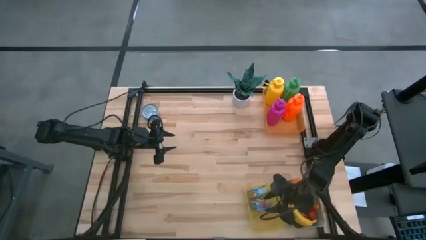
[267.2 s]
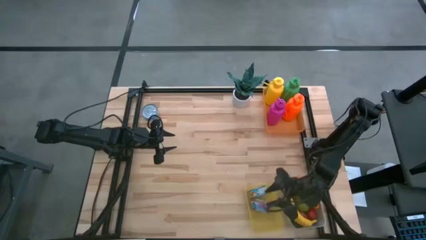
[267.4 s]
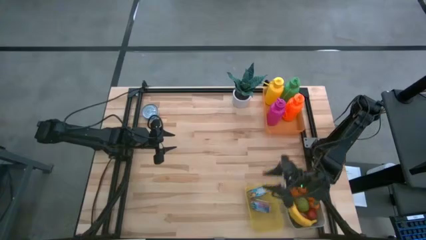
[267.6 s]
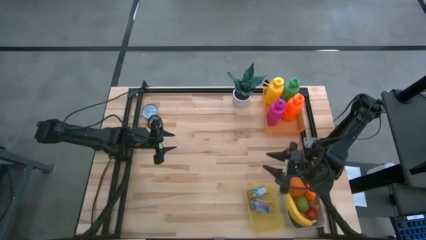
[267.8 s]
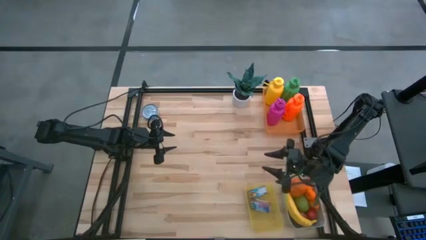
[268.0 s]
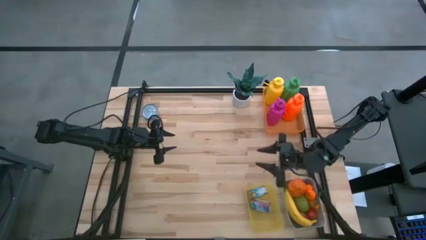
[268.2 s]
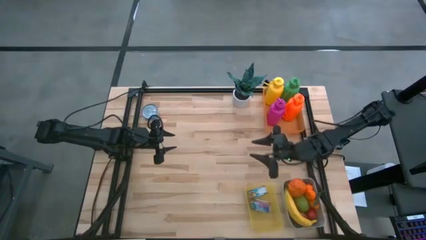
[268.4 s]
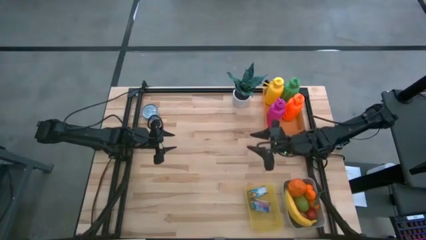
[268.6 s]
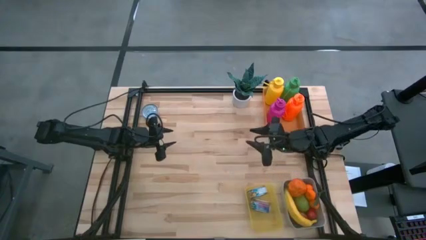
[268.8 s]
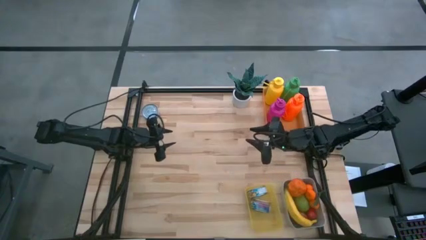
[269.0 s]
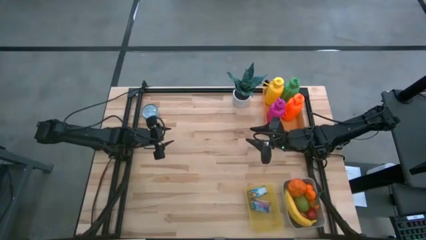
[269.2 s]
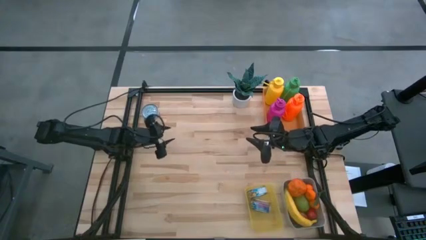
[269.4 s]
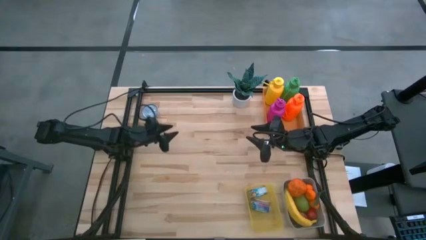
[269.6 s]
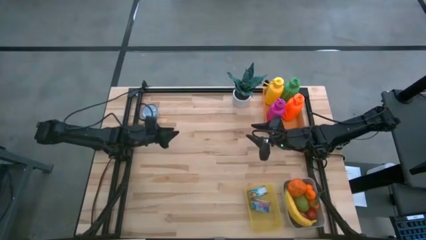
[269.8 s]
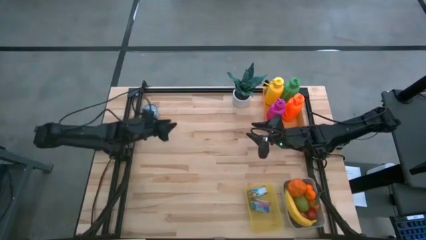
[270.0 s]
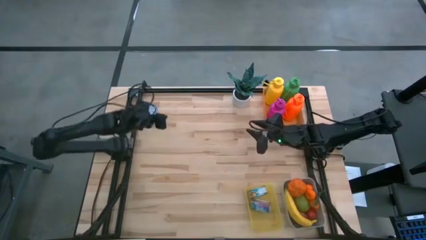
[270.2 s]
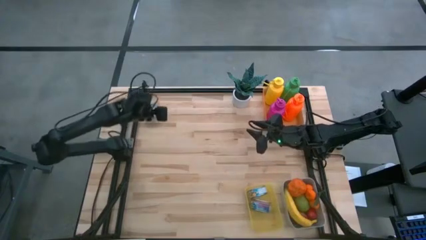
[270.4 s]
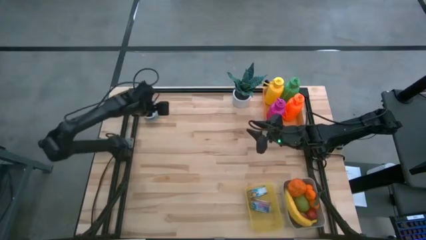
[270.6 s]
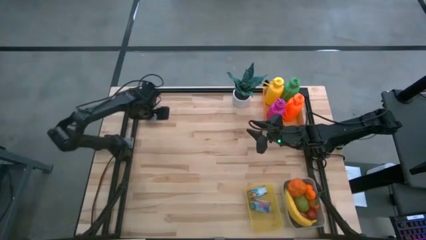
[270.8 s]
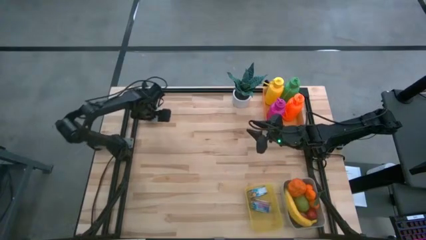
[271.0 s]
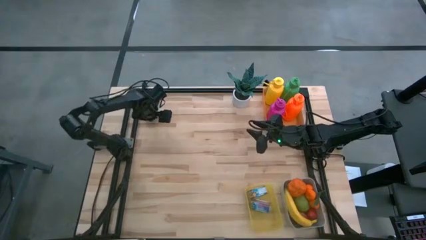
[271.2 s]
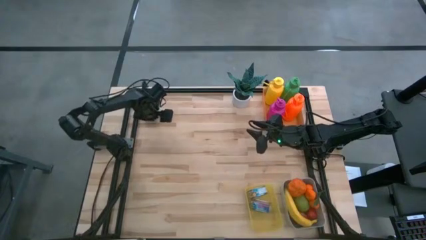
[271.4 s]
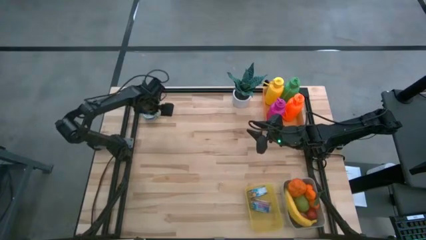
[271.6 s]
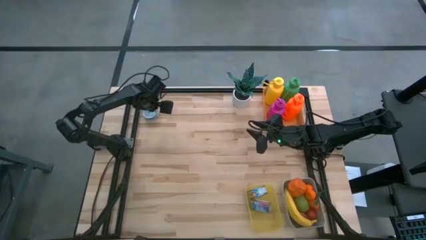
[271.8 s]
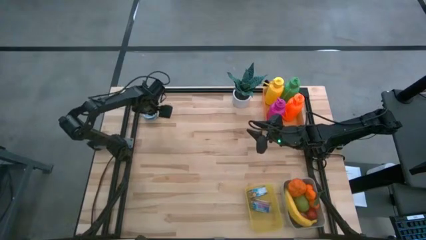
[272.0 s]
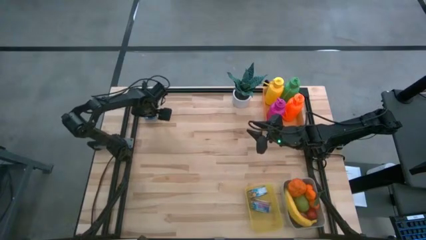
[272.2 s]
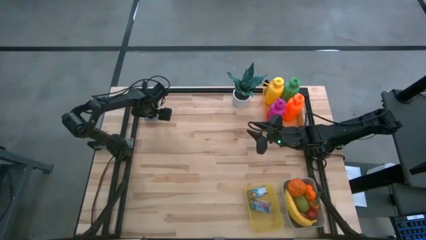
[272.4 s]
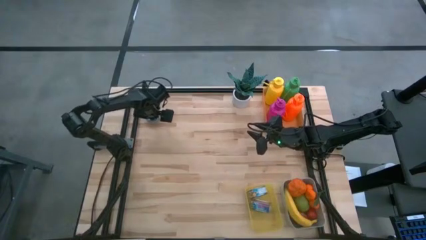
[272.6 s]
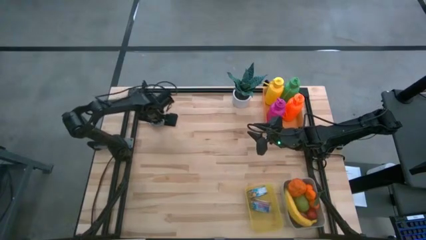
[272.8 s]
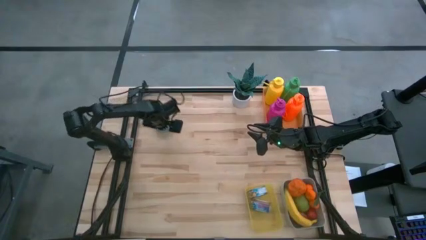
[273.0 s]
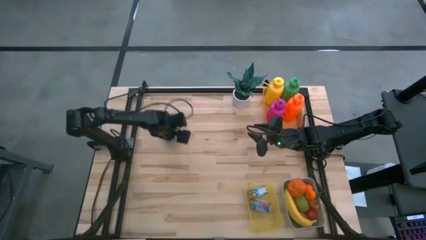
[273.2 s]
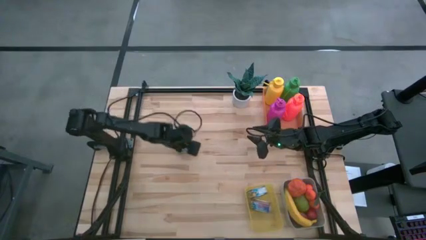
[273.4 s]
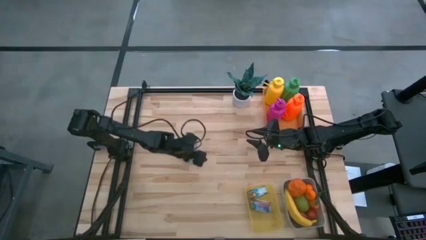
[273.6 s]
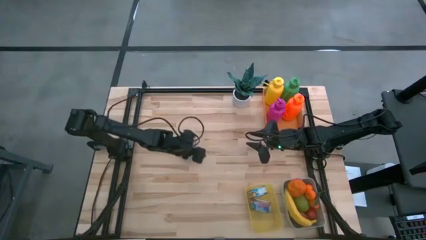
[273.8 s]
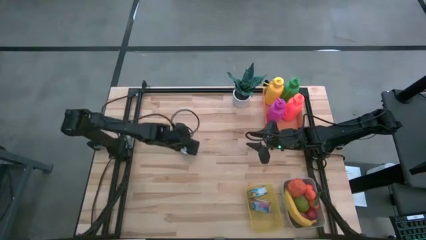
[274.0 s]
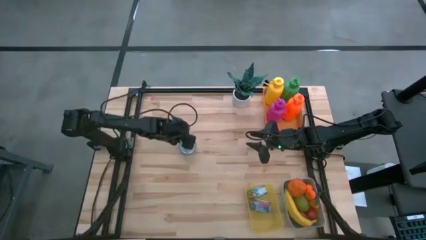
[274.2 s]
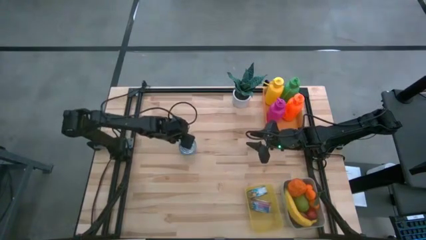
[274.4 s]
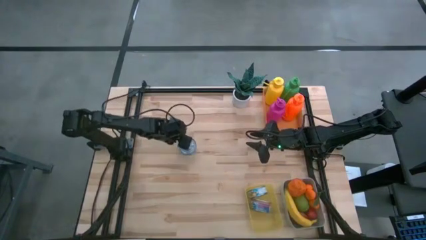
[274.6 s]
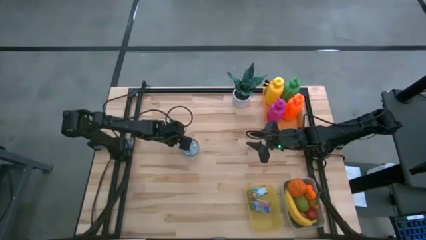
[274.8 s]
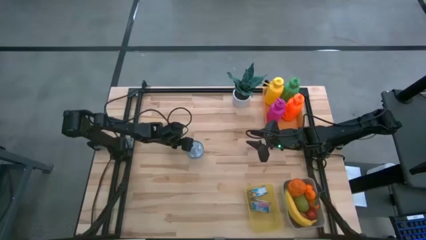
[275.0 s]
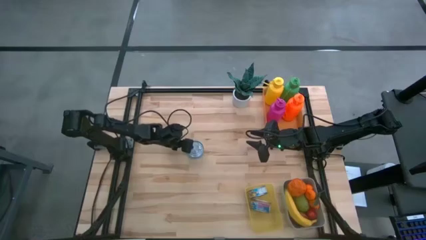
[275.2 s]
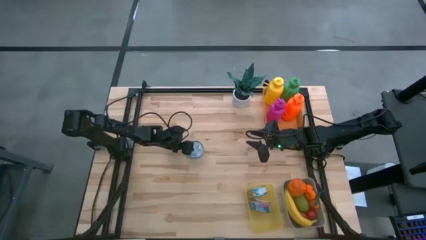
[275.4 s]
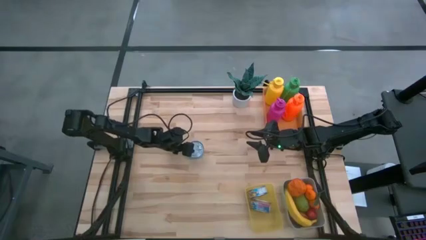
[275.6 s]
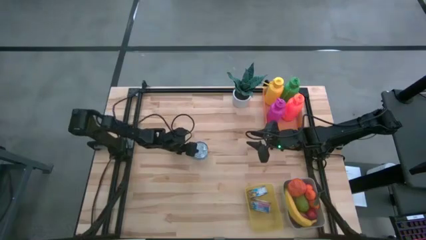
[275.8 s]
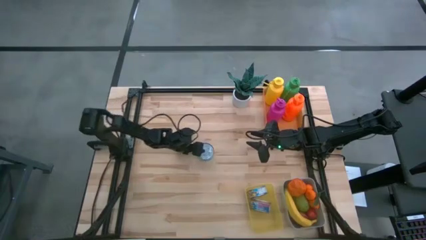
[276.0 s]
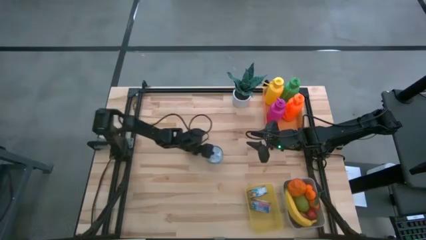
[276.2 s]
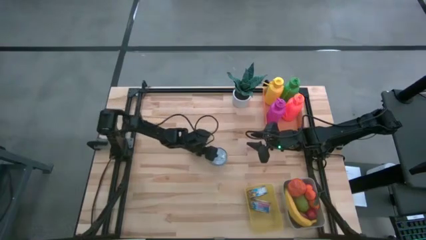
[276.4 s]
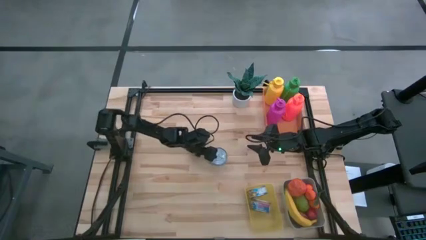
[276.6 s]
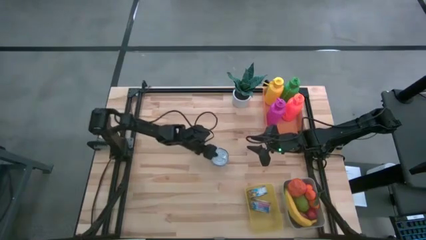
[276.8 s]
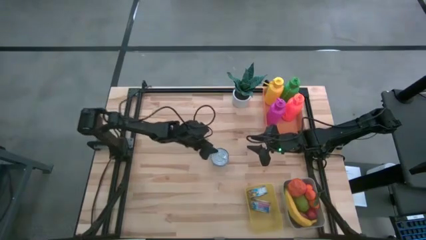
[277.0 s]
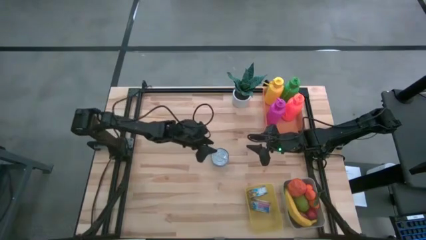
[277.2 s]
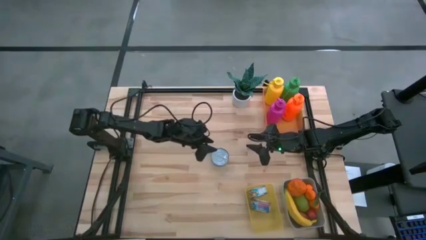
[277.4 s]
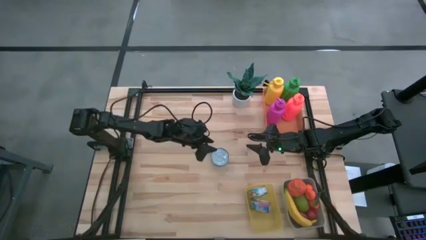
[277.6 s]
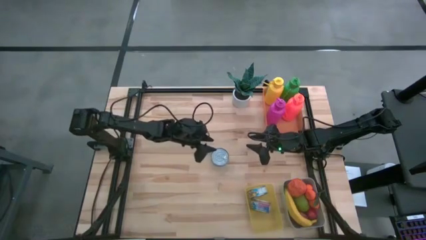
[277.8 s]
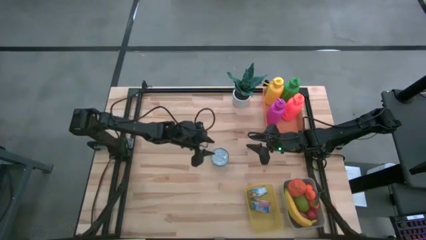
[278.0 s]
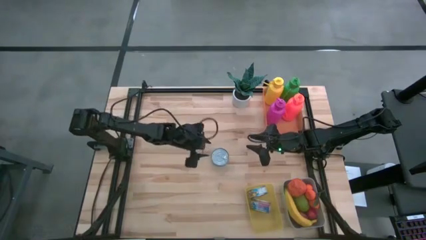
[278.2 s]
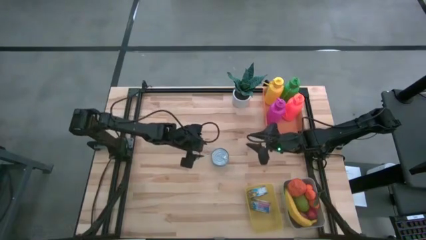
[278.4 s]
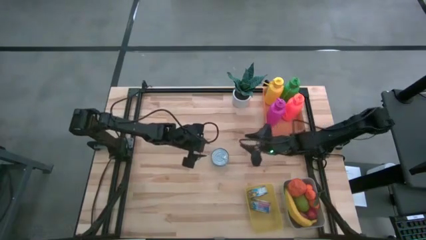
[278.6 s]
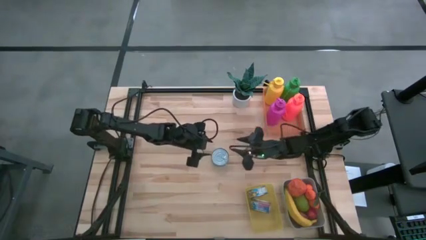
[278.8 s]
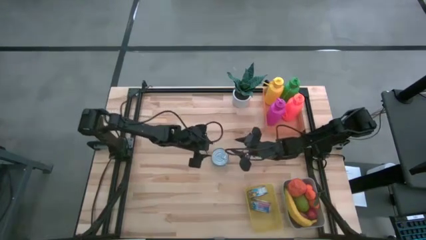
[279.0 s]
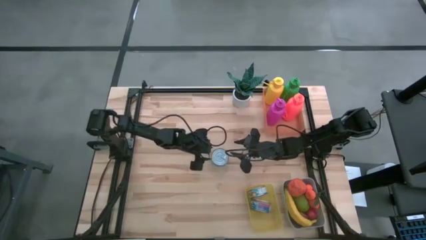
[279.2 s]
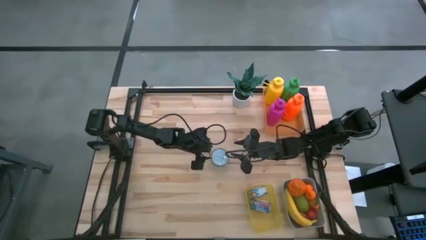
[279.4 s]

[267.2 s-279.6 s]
Task: Pick & Place Food Item
Put the light blue tuna can into the yellow bin
